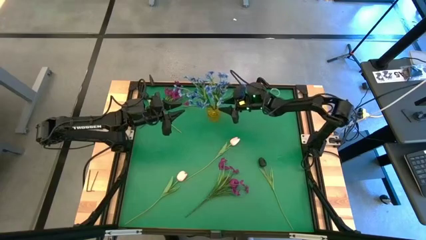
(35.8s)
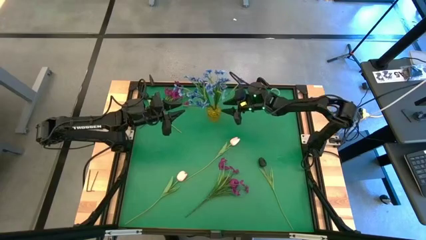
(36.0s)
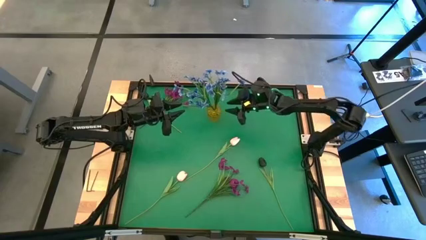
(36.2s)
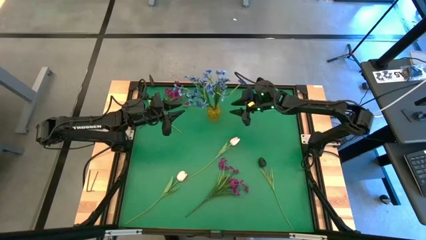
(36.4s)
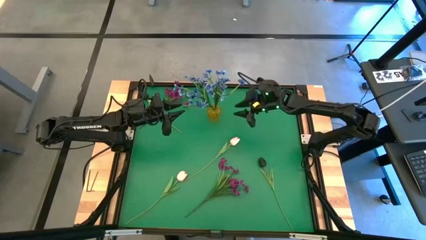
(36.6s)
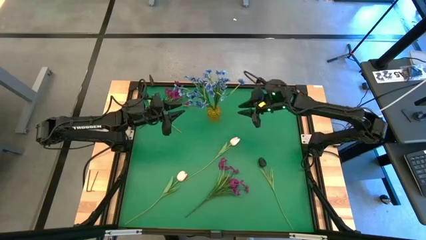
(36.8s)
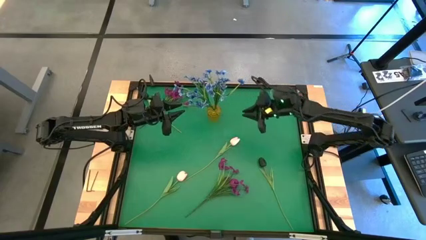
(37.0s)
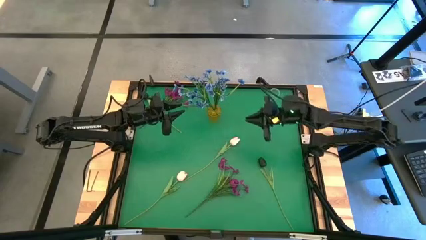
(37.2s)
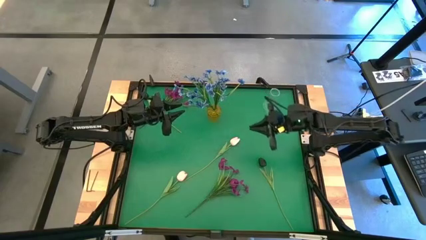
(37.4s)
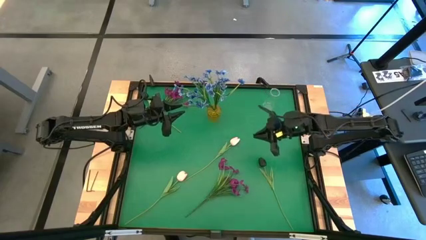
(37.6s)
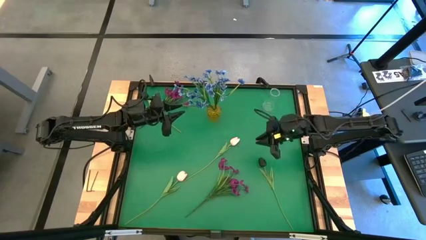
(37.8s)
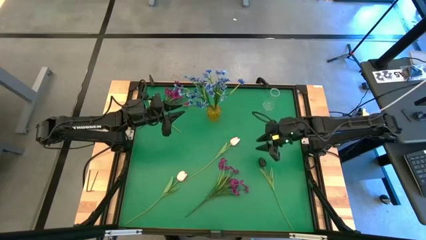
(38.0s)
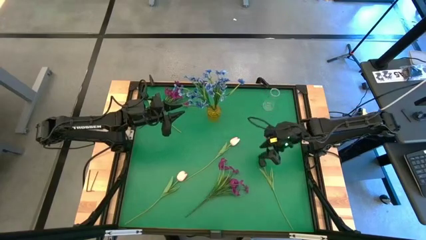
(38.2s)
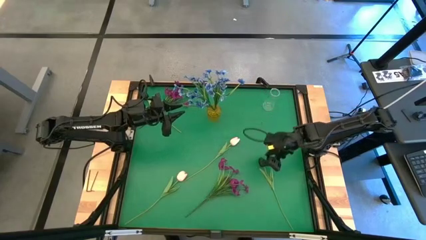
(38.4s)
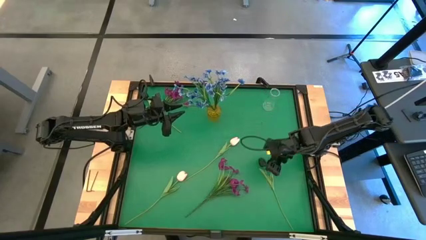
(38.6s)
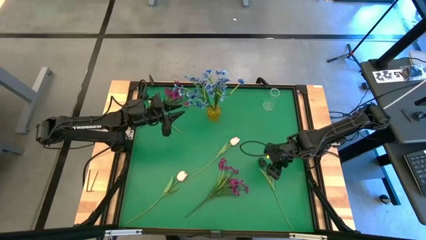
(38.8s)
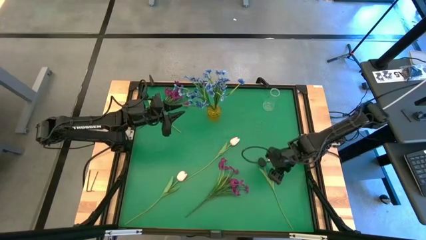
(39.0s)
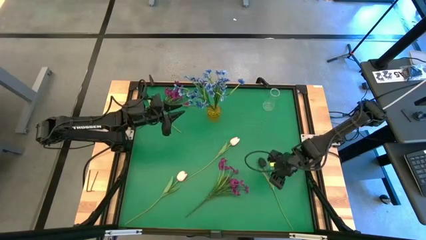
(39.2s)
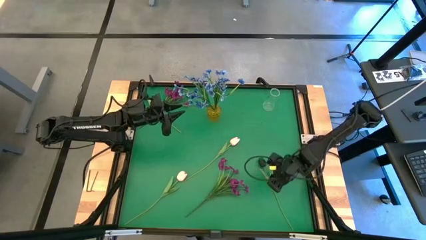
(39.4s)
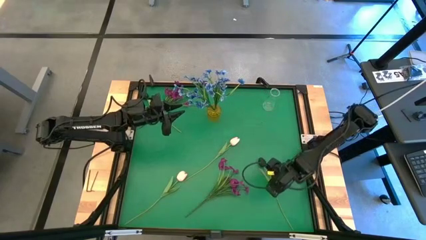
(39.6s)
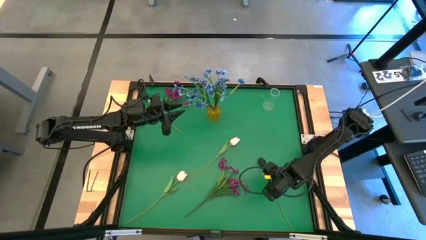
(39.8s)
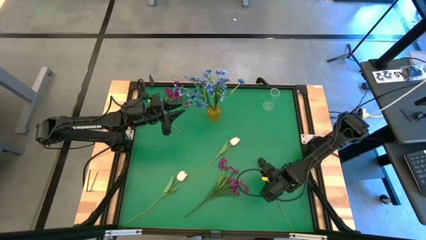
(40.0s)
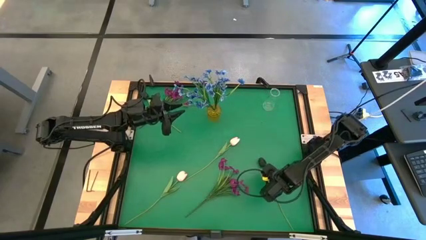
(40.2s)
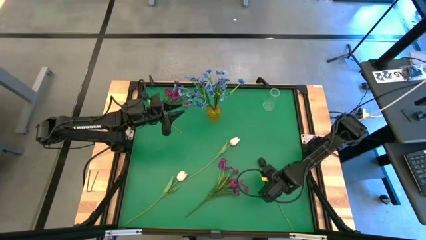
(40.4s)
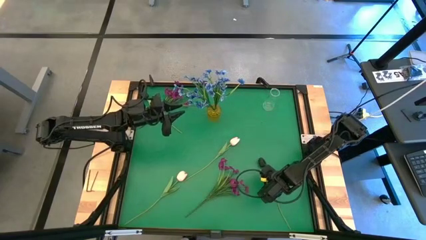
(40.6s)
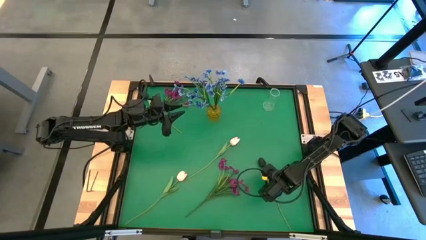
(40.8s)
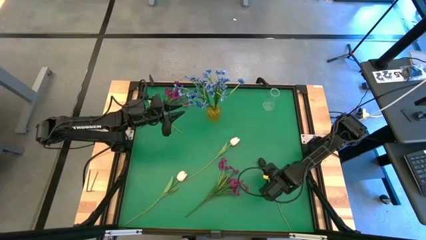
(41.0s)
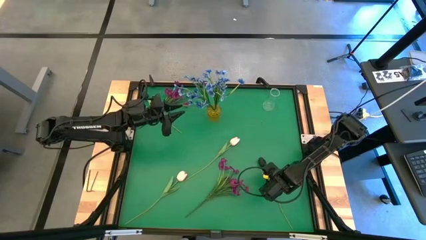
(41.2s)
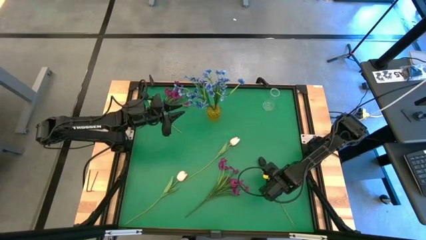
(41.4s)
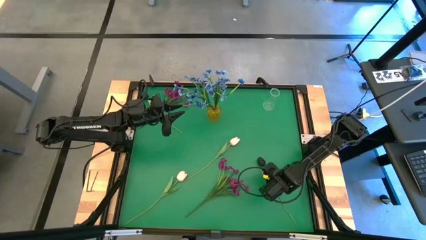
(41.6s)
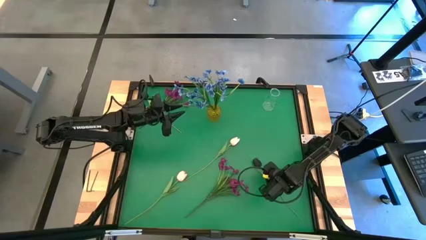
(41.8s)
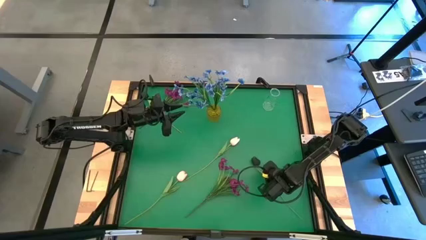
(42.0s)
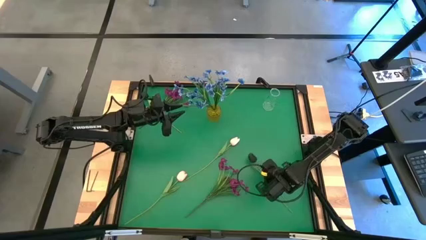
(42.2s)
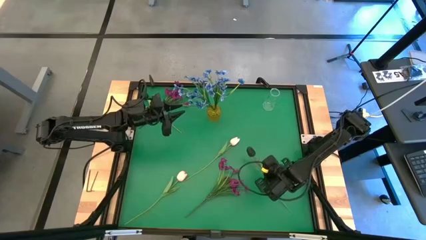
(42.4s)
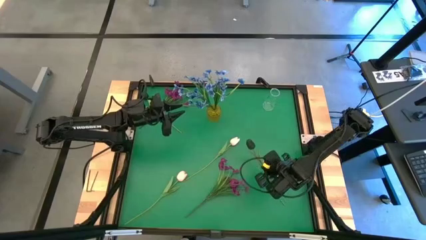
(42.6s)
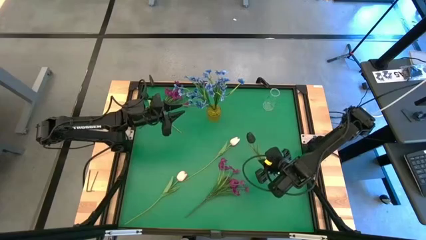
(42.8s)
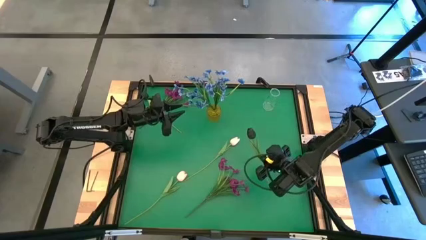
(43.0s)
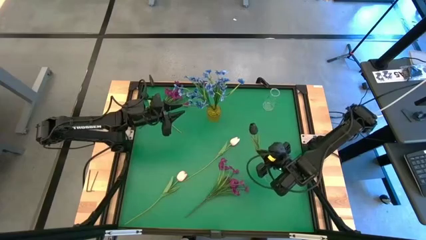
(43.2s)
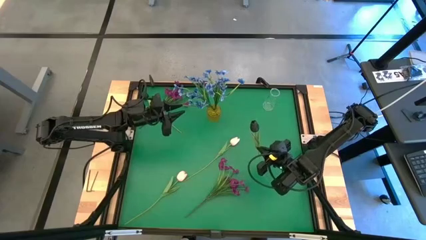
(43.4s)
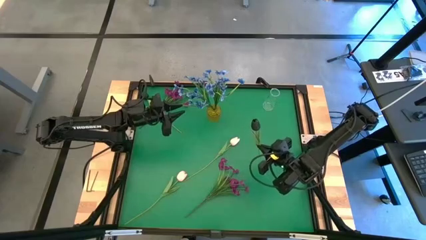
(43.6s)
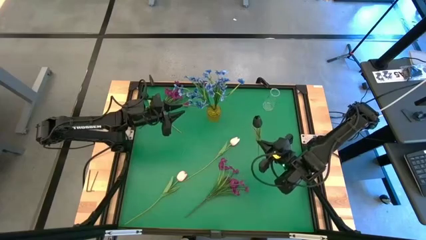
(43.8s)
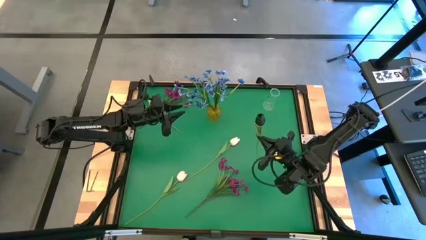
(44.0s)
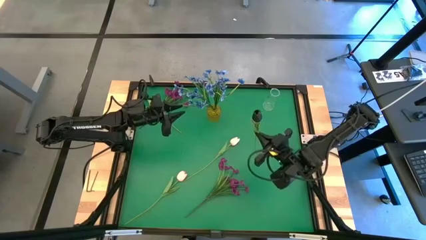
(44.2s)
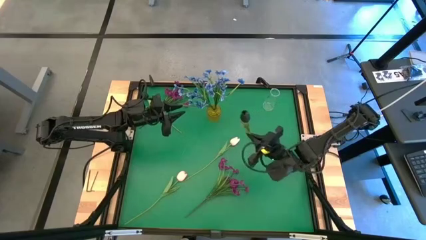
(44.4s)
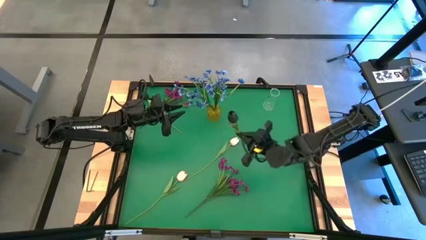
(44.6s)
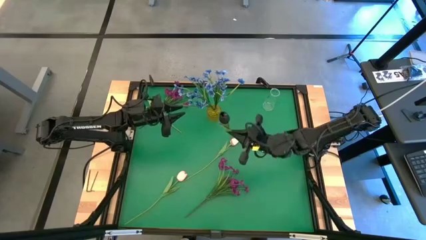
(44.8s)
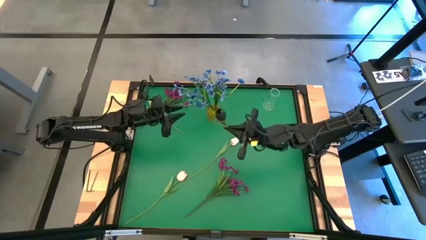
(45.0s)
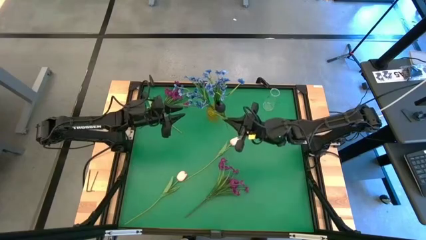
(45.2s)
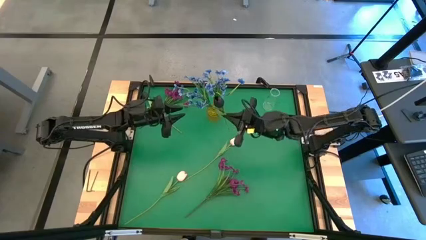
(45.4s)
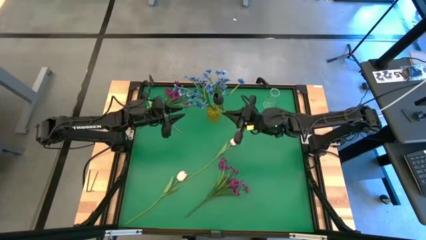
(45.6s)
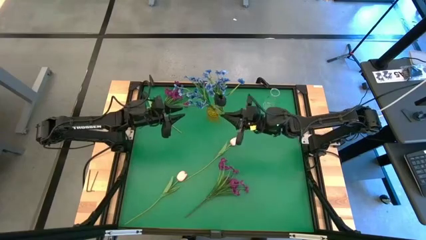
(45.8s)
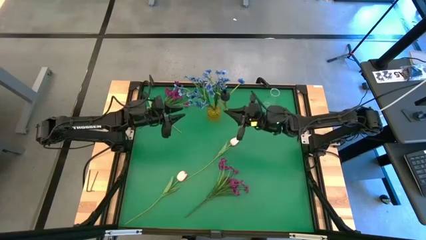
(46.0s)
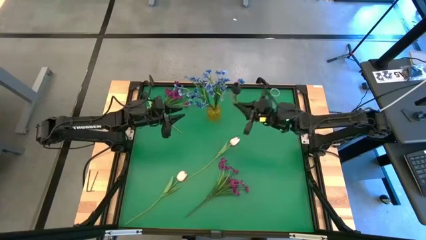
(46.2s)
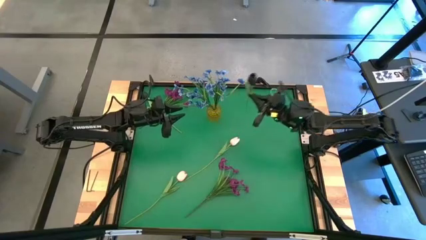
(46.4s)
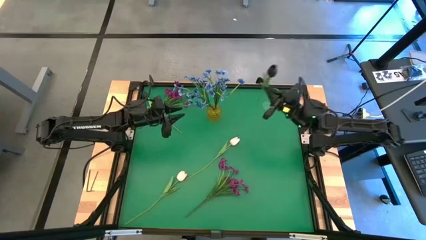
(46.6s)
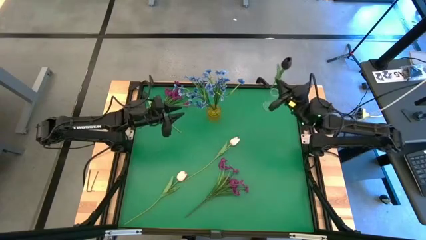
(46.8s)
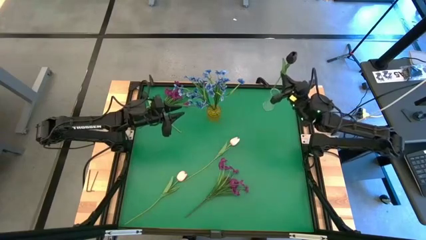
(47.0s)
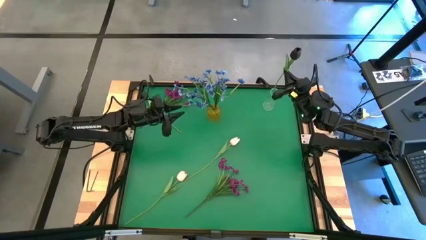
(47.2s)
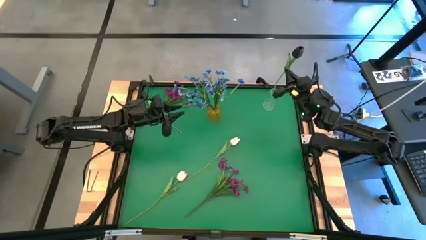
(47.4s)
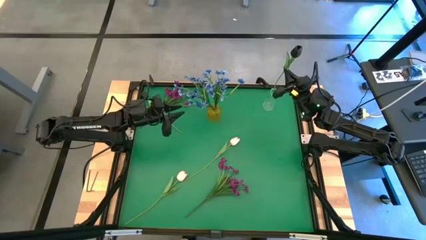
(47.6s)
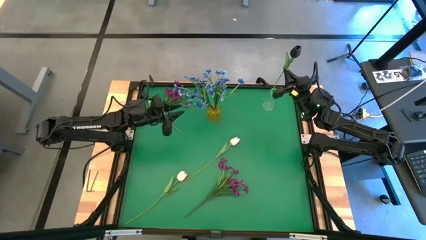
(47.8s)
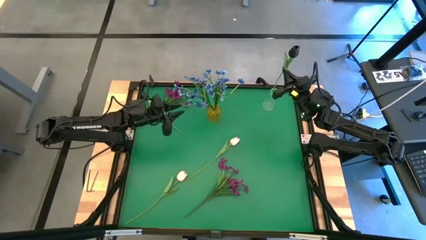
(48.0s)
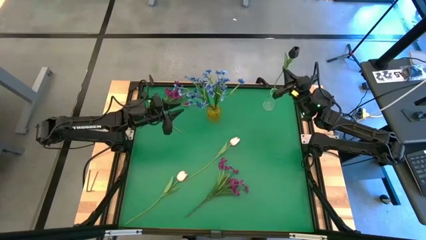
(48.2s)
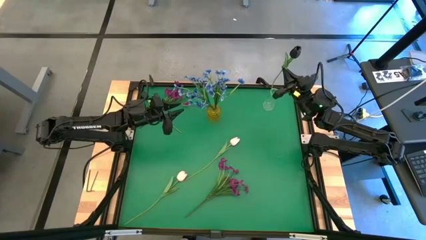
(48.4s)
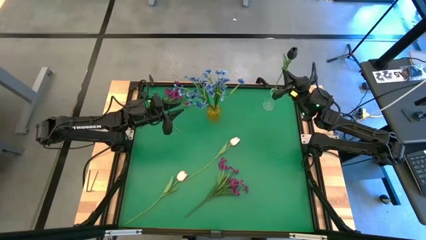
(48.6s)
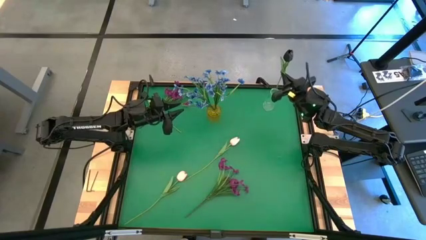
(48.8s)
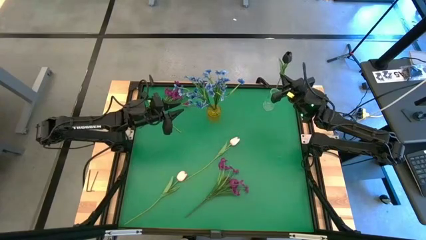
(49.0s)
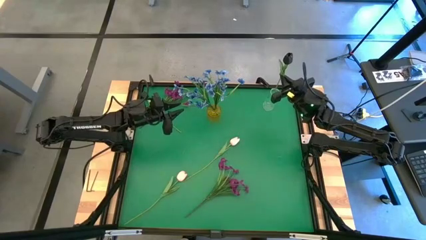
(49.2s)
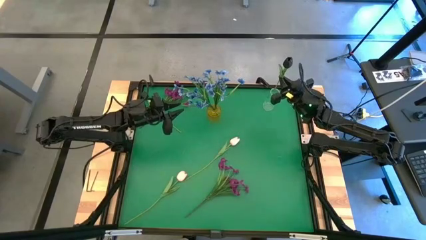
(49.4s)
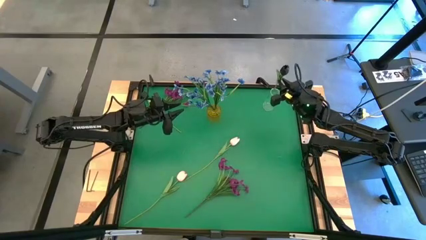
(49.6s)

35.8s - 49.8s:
Task: Sort flowers into vase by color
Put the bottom black flower into the transparent vase
